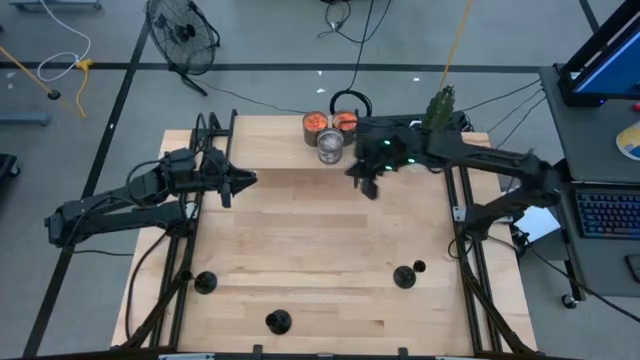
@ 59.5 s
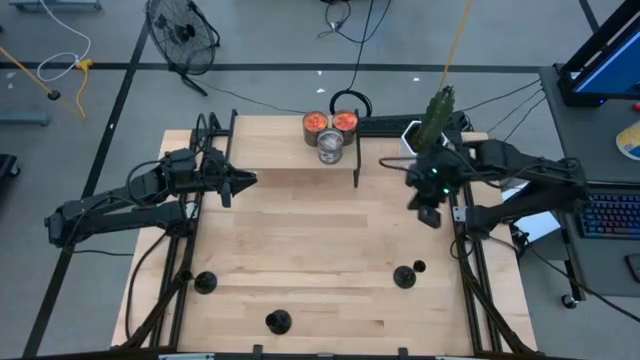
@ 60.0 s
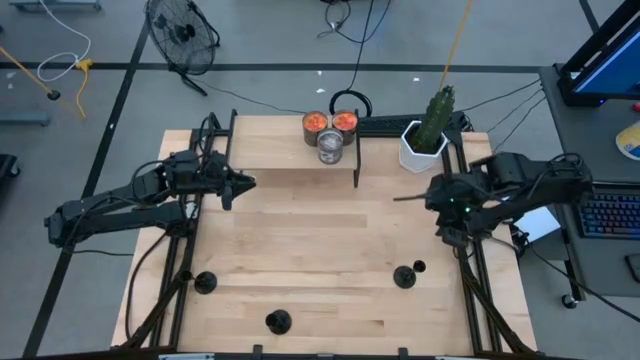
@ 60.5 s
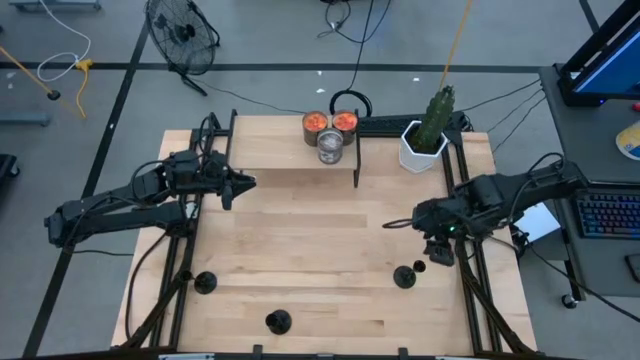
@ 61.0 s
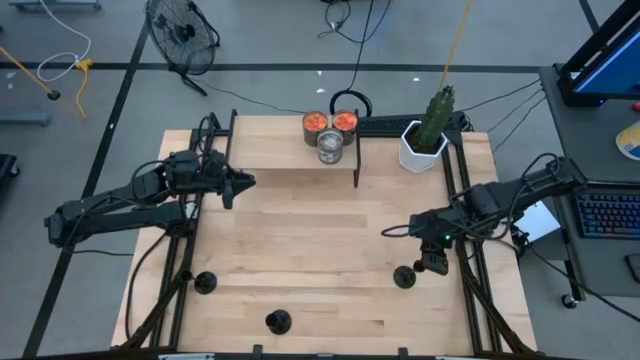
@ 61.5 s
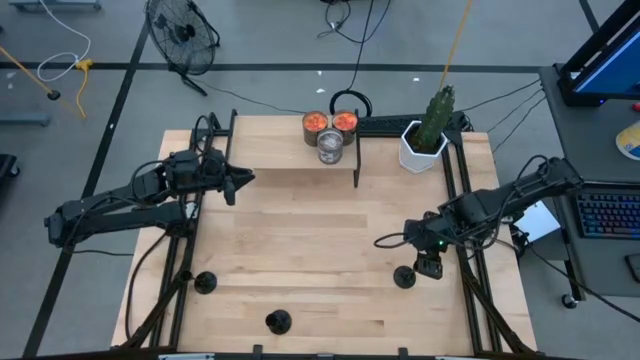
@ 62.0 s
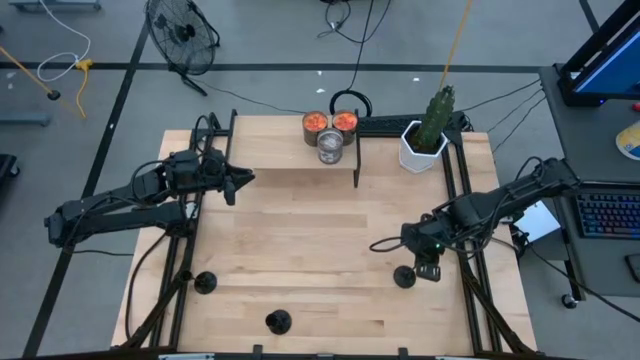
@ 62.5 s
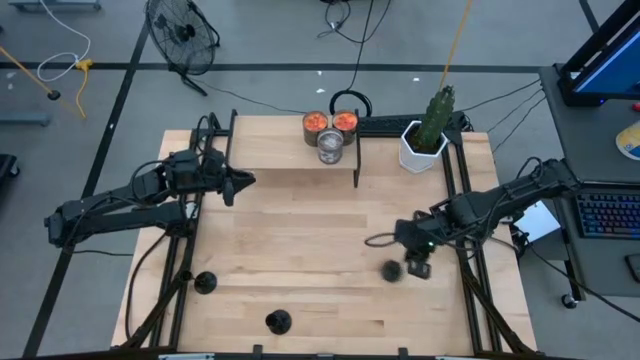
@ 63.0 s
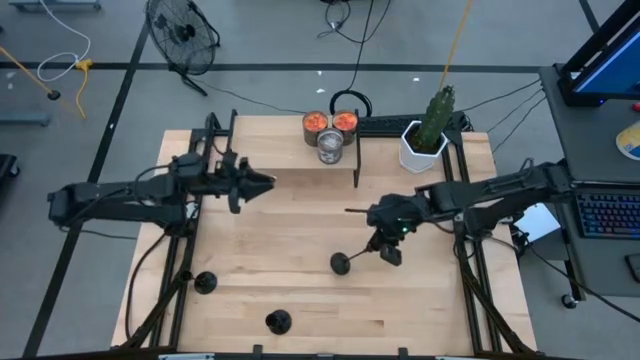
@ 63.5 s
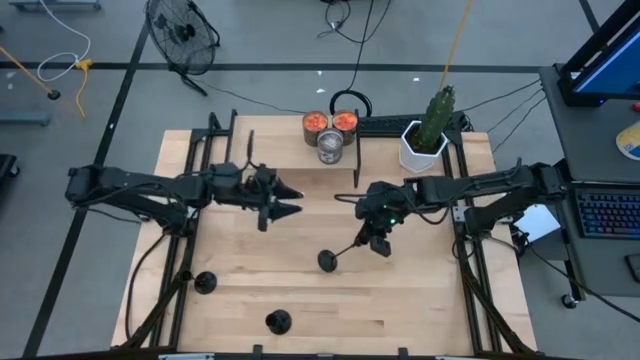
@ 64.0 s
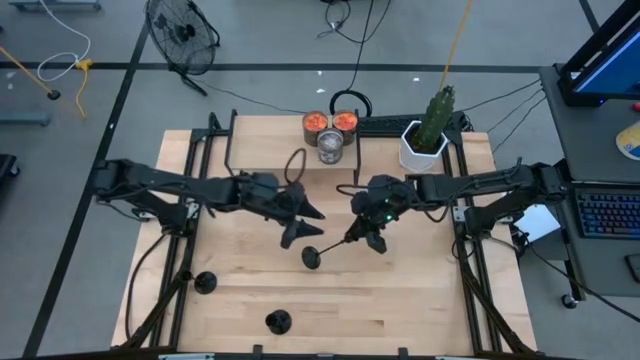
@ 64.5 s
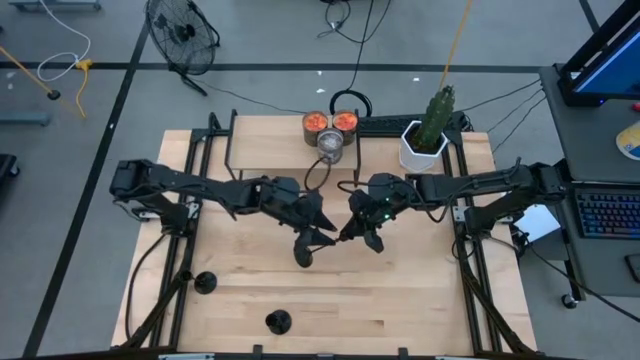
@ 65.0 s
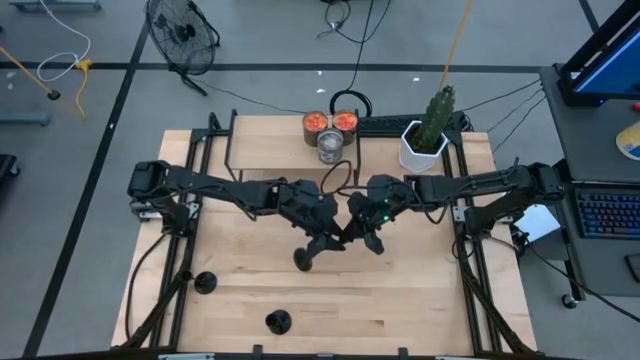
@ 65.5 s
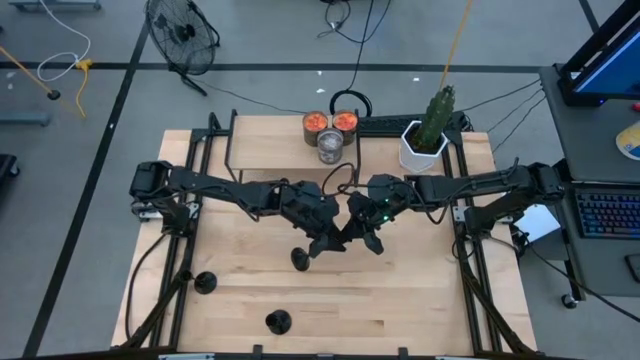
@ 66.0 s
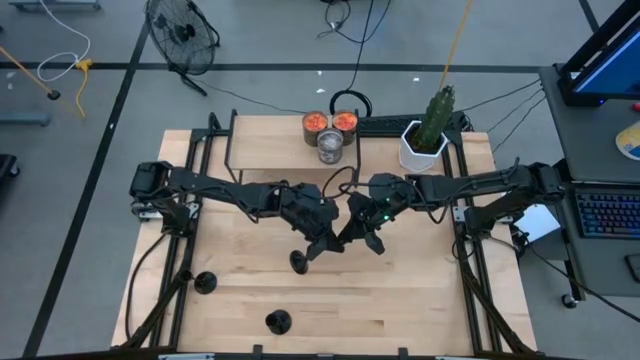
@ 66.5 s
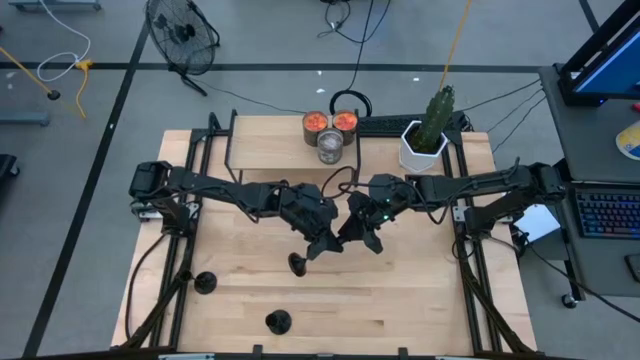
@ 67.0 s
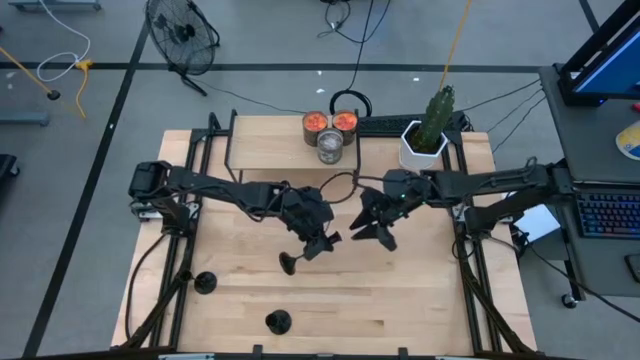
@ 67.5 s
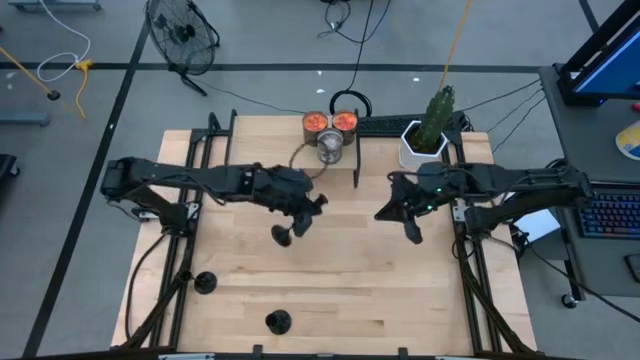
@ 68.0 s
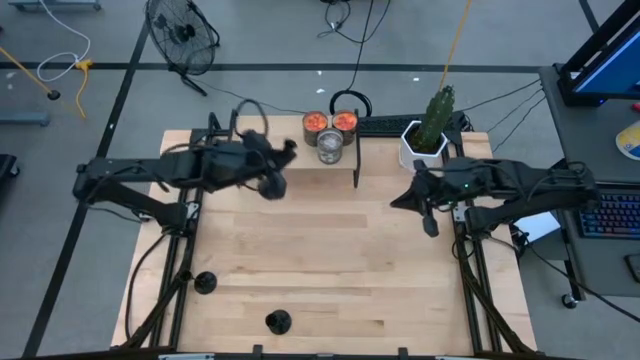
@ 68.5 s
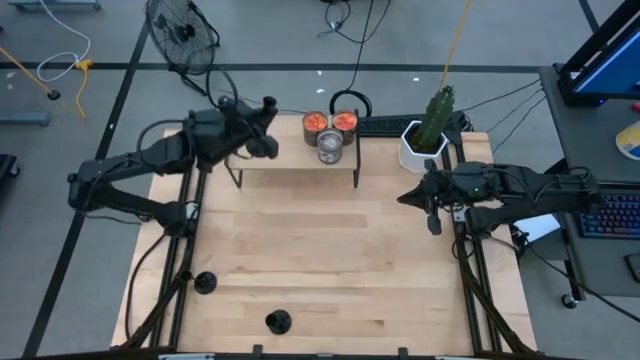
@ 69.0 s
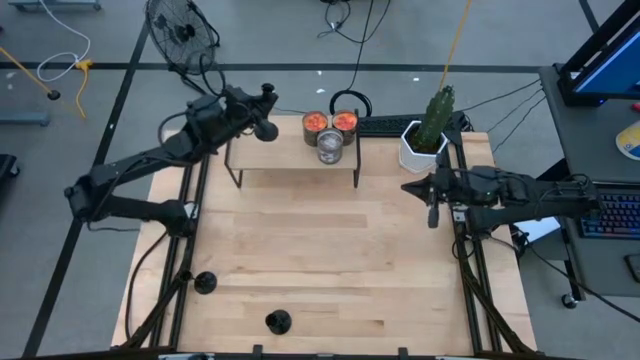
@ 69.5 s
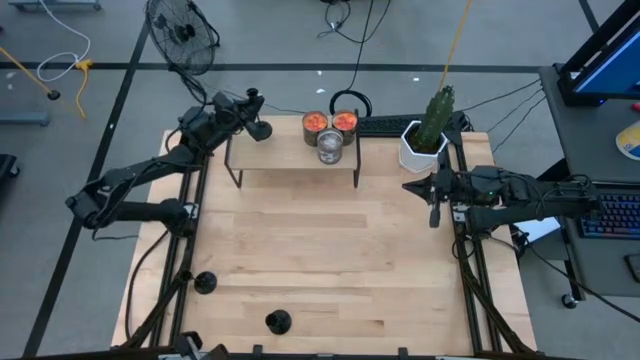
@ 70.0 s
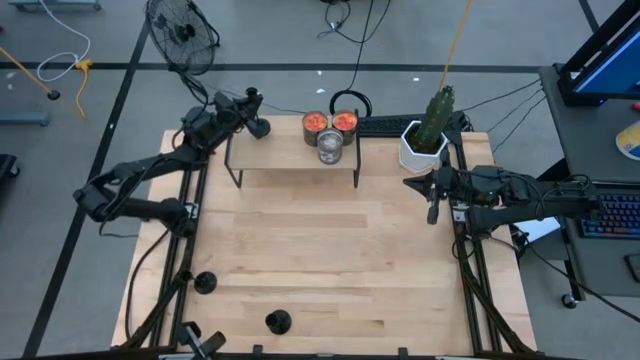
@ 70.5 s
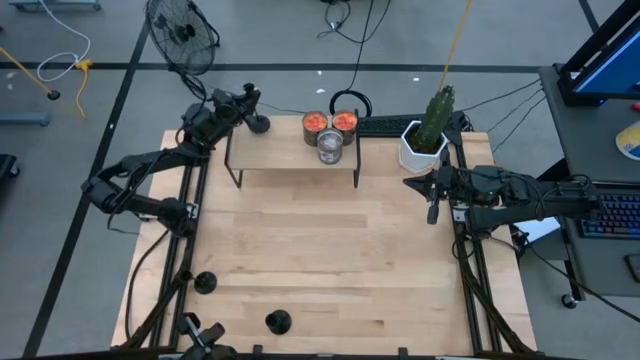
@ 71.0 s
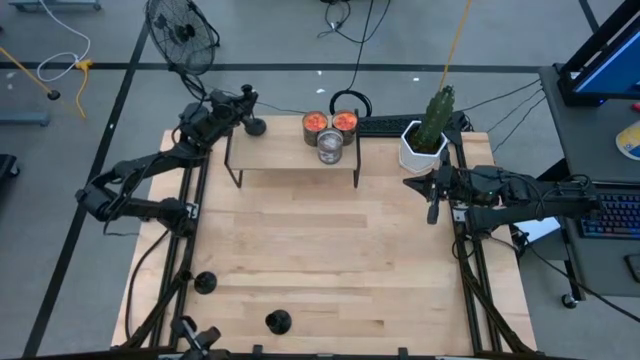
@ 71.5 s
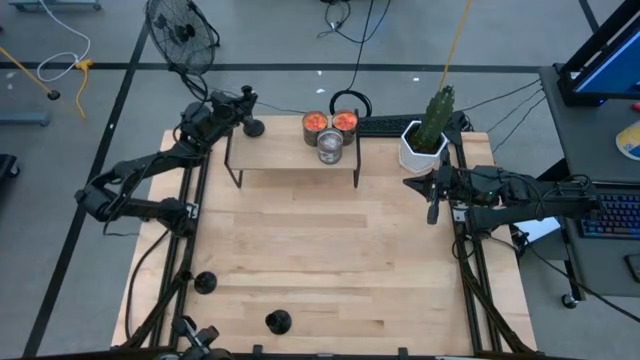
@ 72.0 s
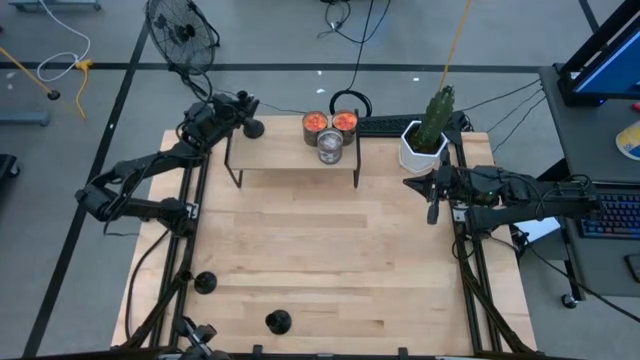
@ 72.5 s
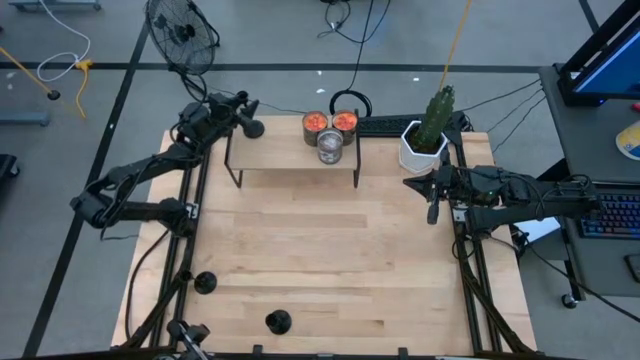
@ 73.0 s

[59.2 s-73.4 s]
Task: Pick & Place candle stick holders
Put the top right black candle holder on the shelf

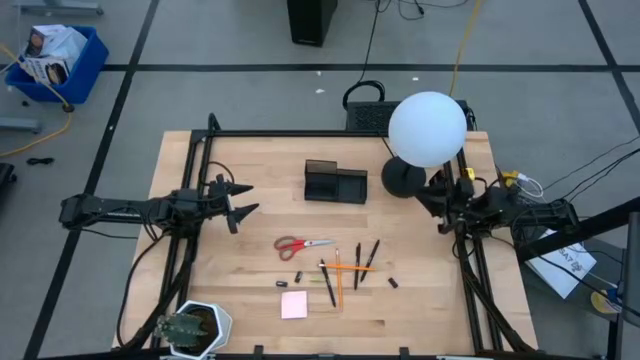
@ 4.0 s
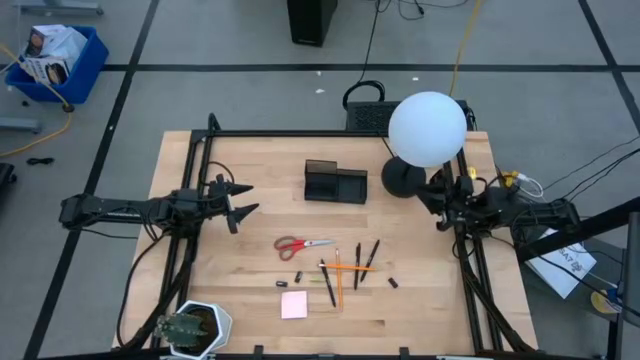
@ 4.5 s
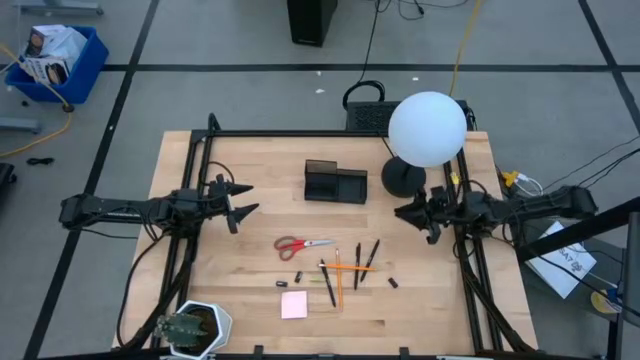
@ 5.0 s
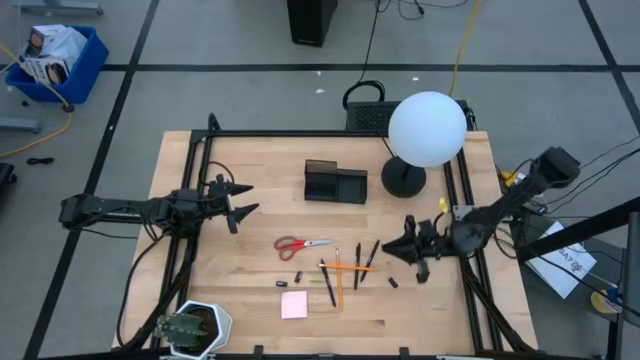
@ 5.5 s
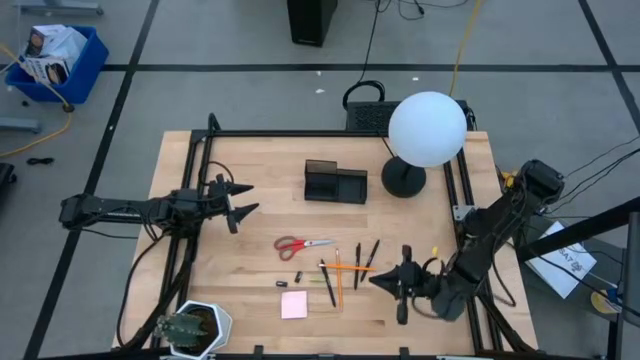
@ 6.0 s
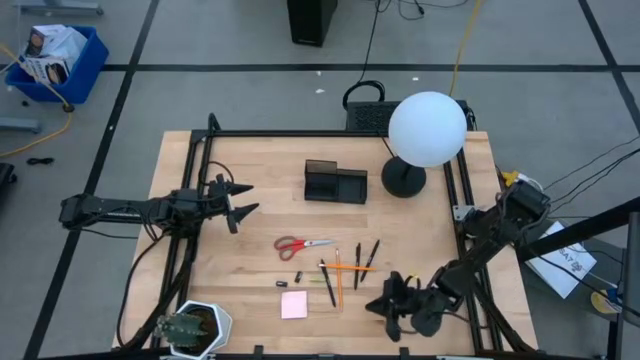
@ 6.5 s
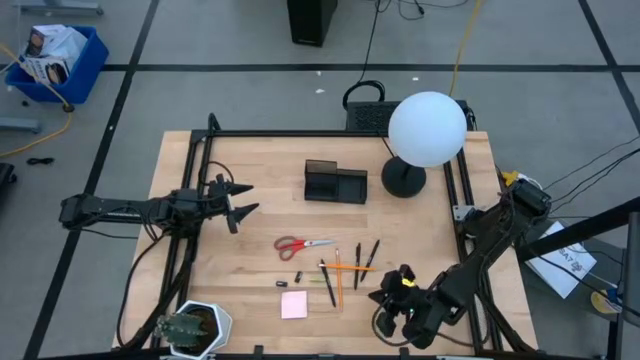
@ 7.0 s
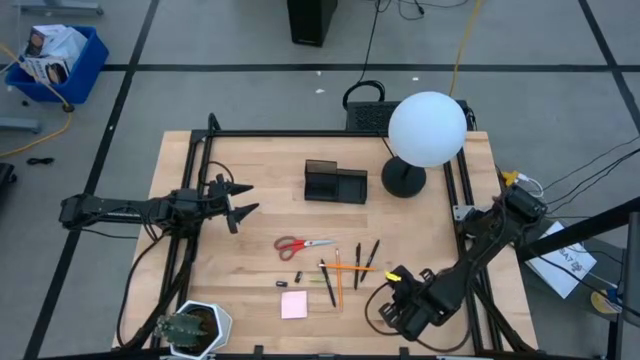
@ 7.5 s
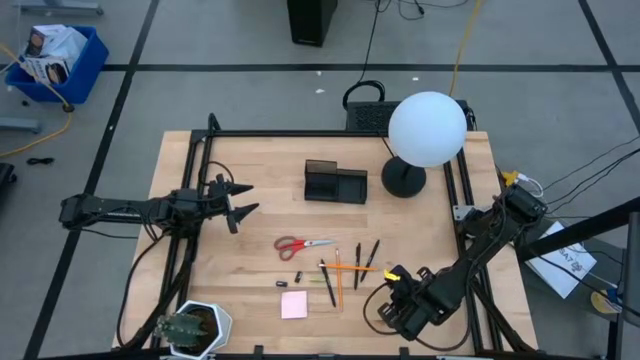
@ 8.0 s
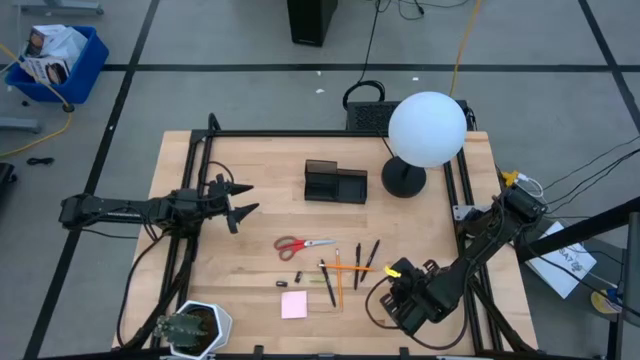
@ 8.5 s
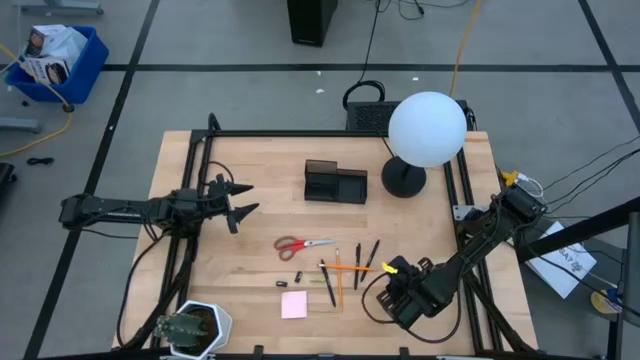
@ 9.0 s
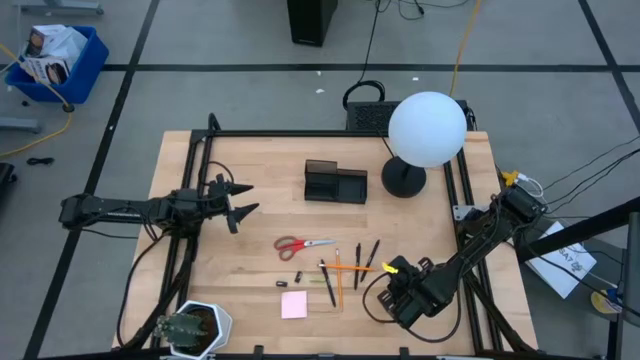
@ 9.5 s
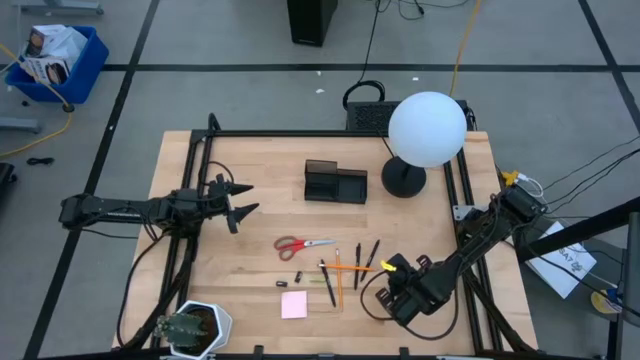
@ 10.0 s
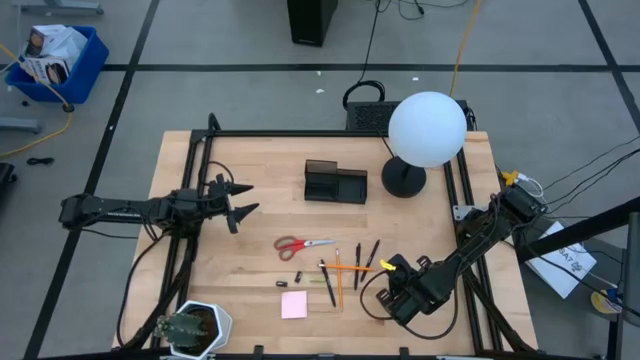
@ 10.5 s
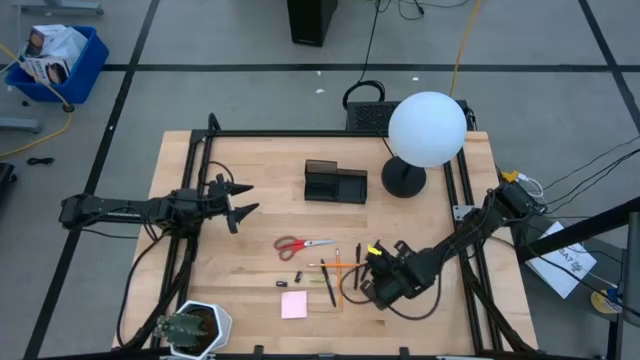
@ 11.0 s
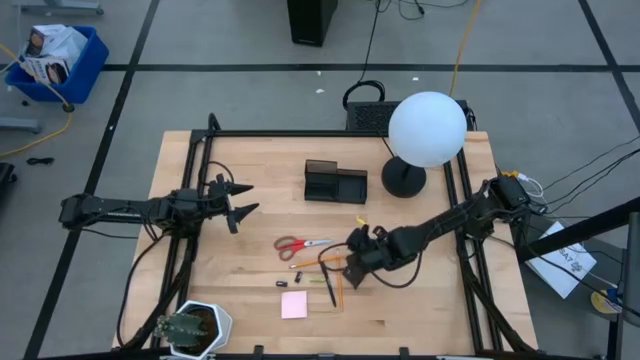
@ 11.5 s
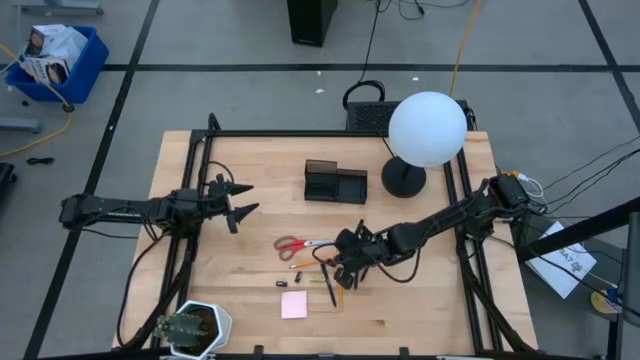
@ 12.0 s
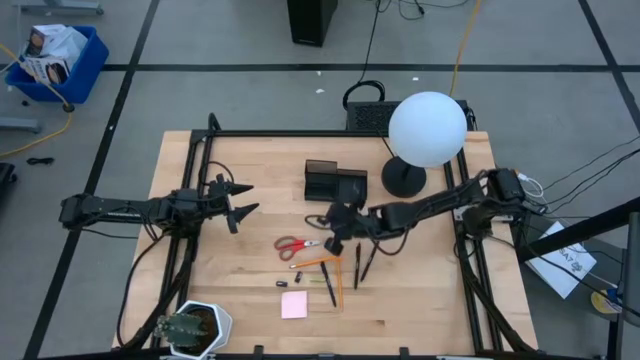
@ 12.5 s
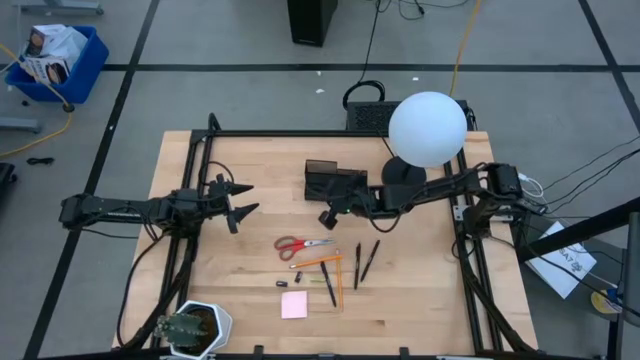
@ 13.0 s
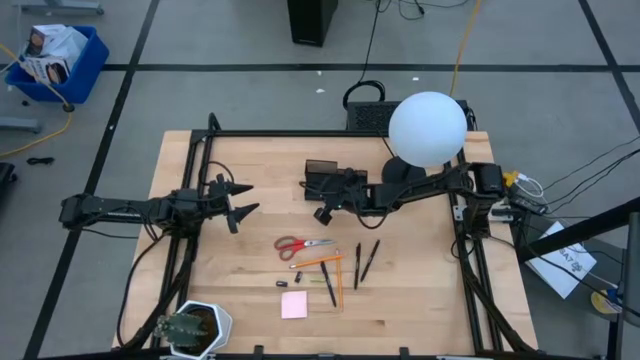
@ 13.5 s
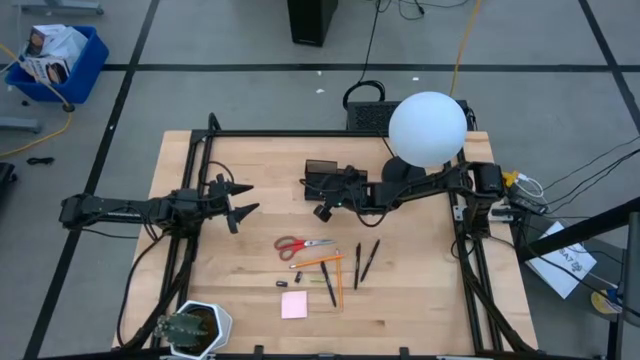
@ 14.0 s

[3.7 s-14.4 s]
Task: Pick and place office supplies into organizer
Put the right black binder clip into the black desk organizer
